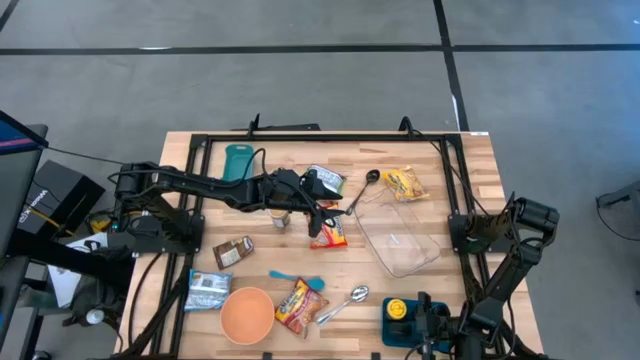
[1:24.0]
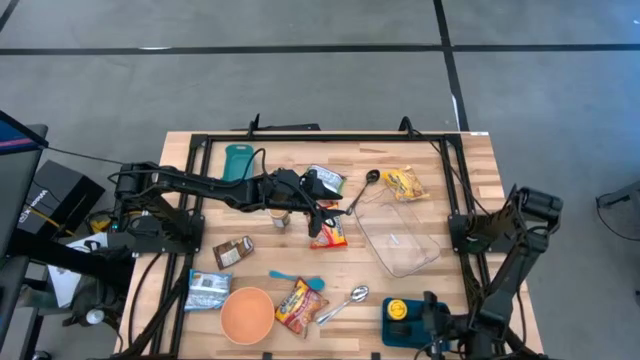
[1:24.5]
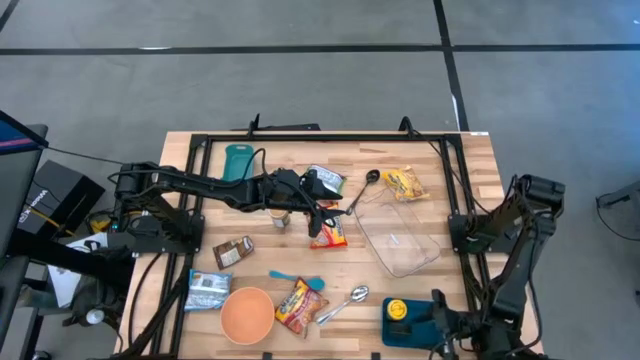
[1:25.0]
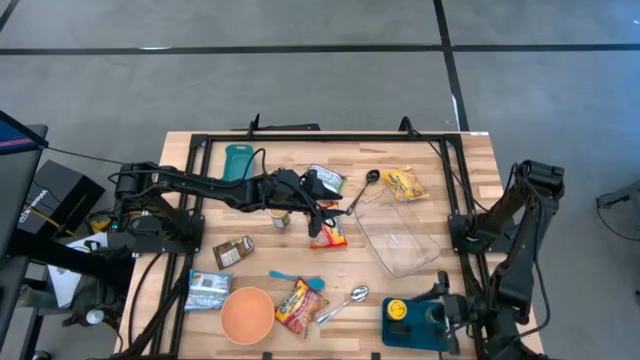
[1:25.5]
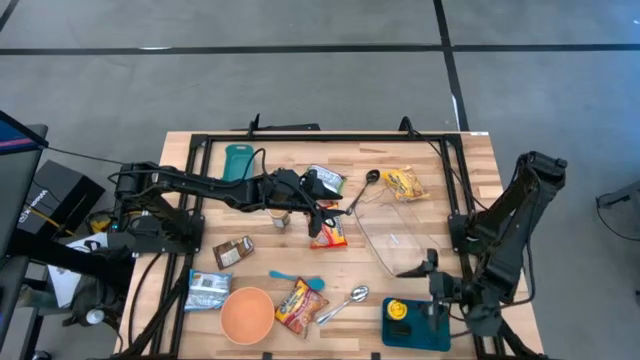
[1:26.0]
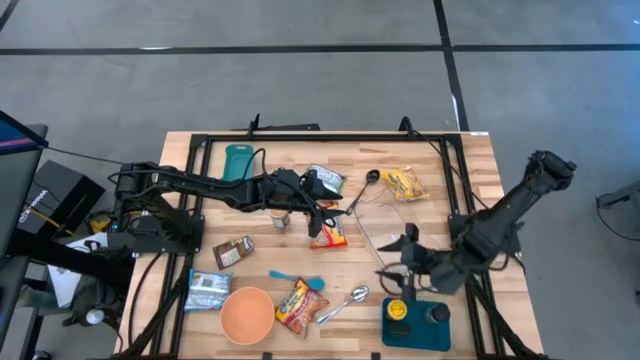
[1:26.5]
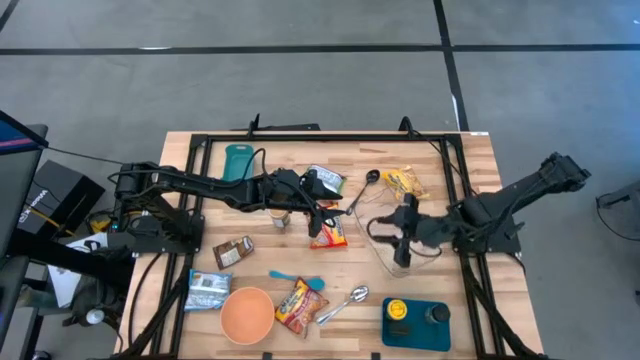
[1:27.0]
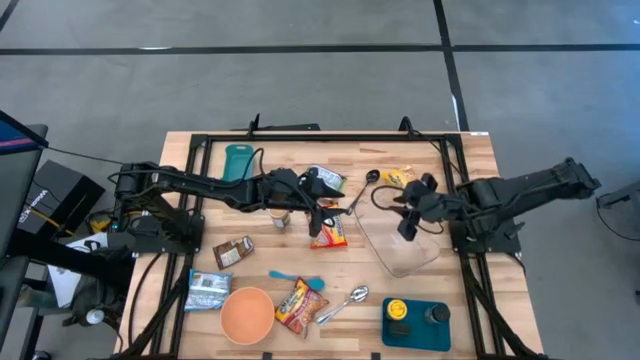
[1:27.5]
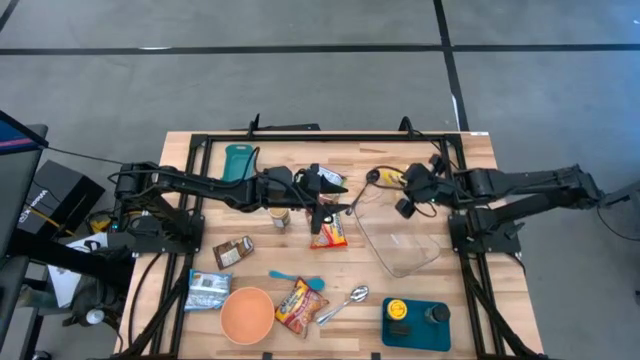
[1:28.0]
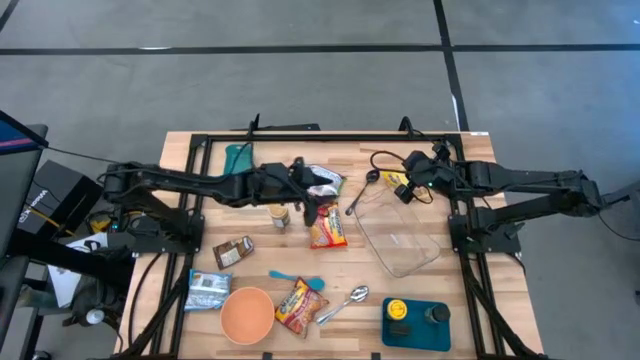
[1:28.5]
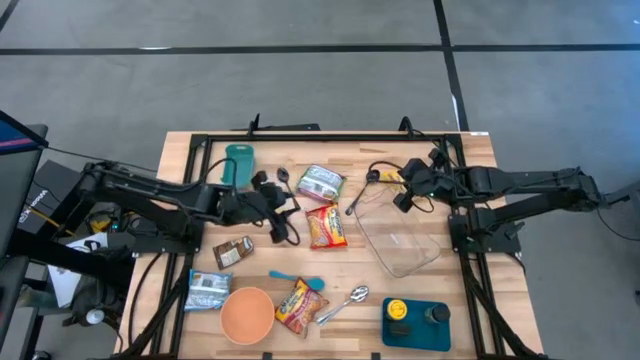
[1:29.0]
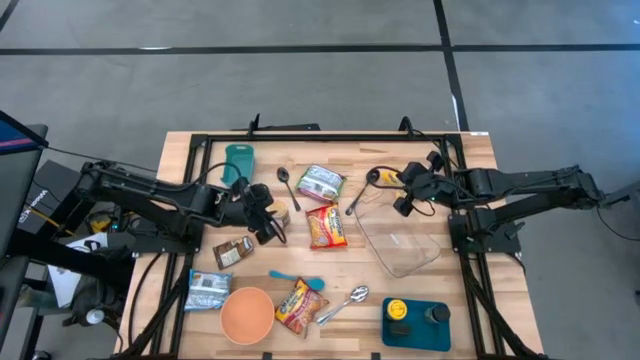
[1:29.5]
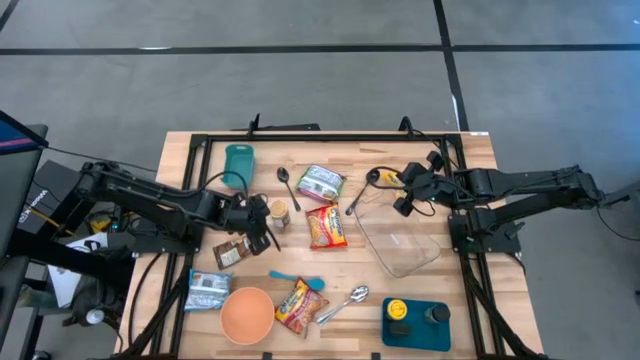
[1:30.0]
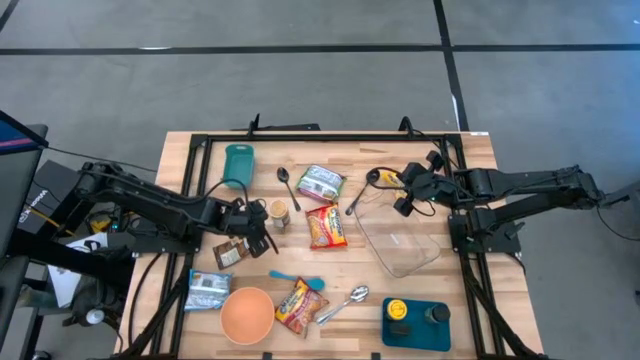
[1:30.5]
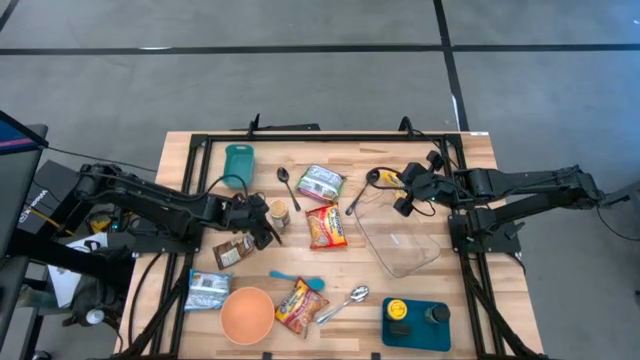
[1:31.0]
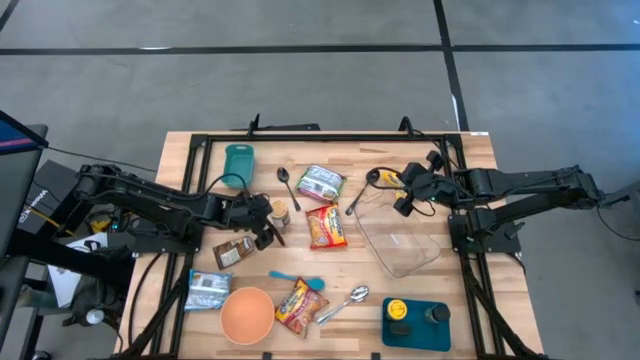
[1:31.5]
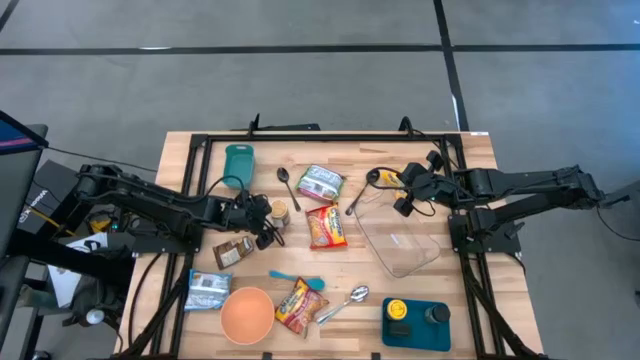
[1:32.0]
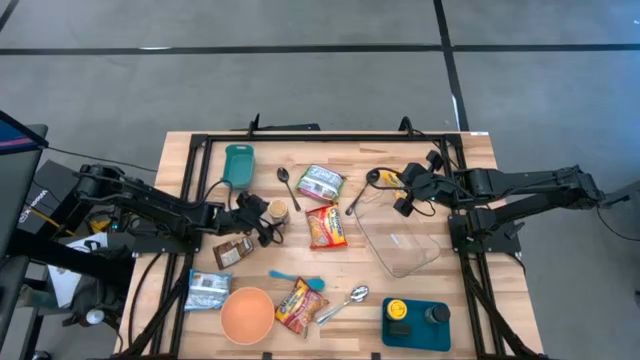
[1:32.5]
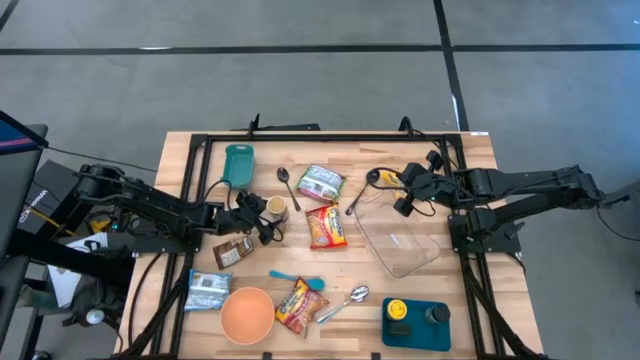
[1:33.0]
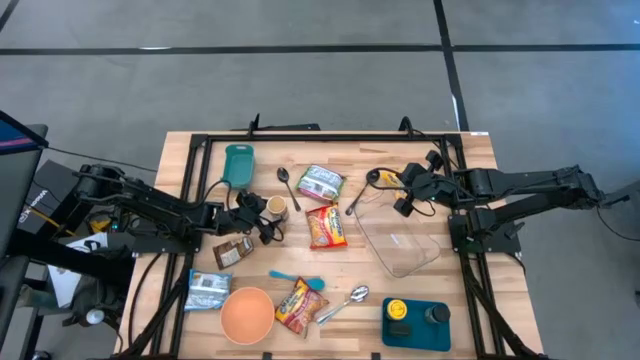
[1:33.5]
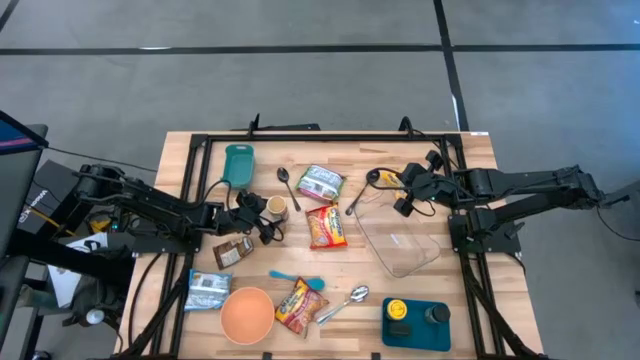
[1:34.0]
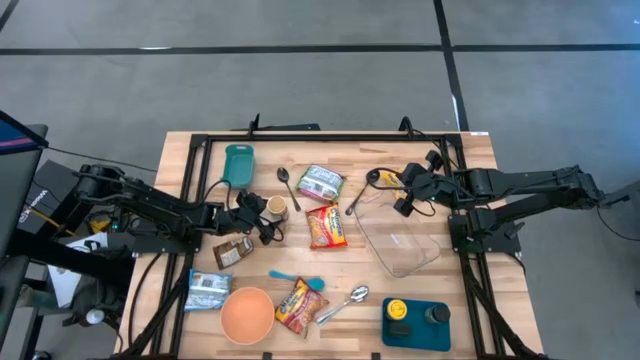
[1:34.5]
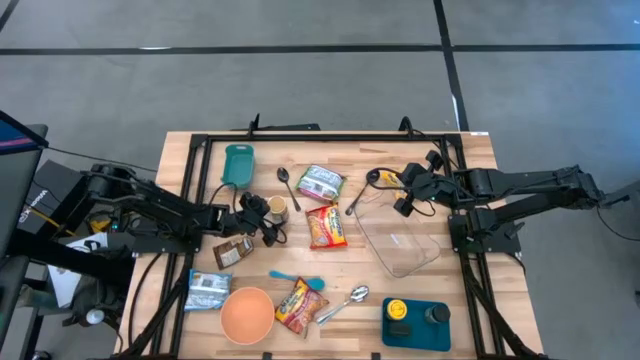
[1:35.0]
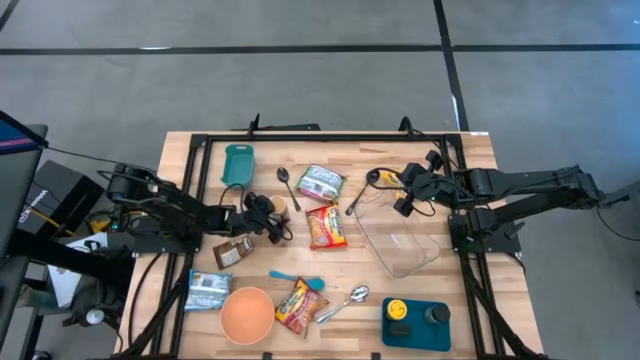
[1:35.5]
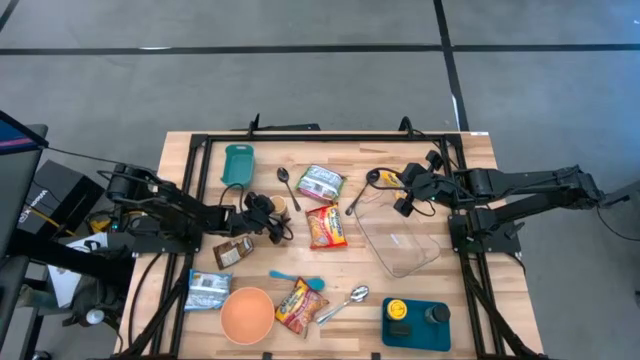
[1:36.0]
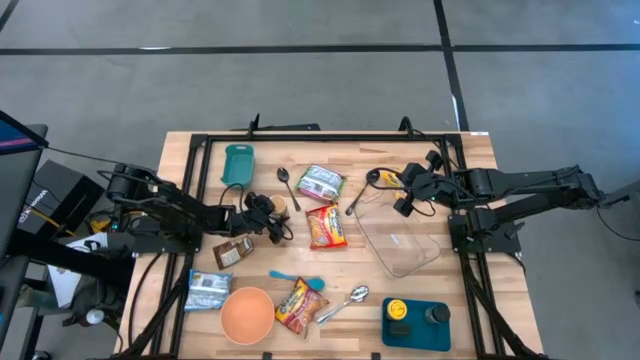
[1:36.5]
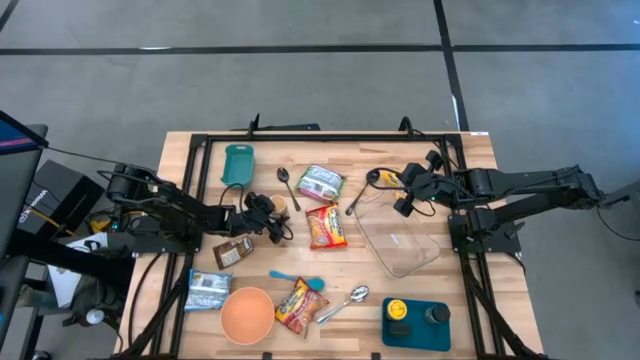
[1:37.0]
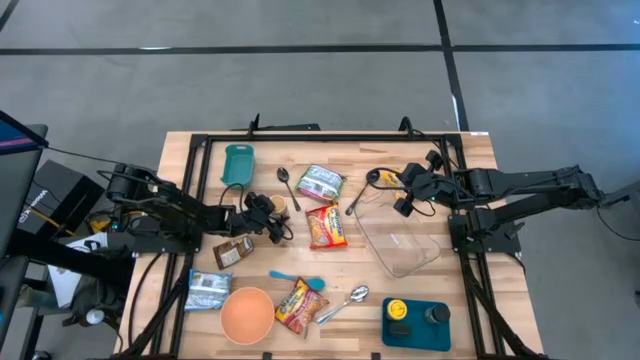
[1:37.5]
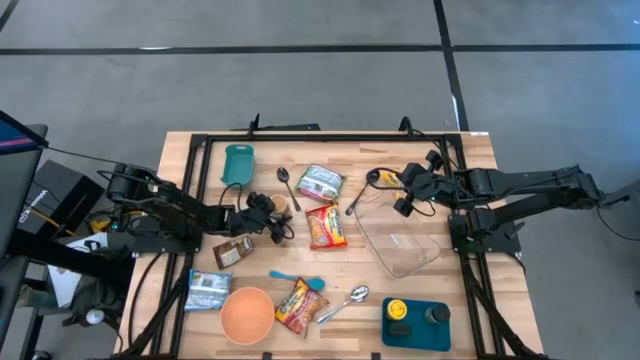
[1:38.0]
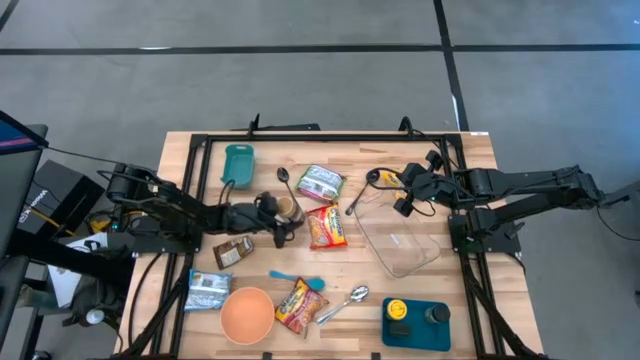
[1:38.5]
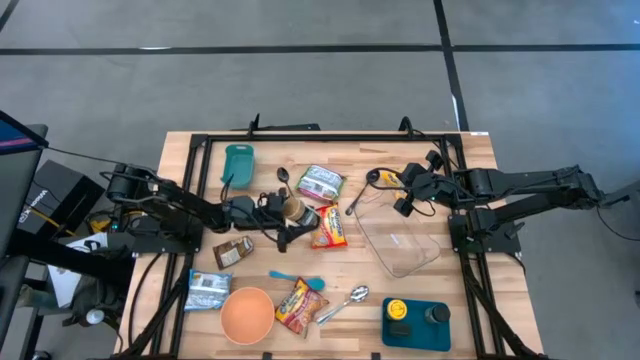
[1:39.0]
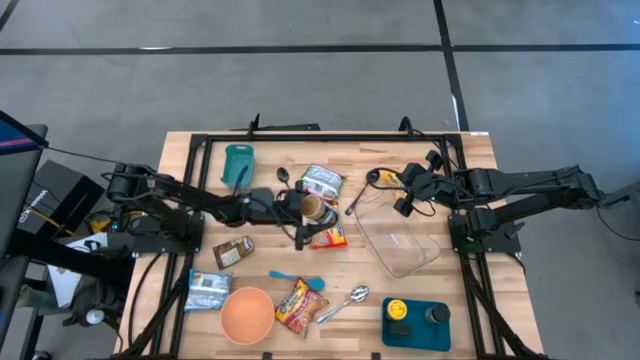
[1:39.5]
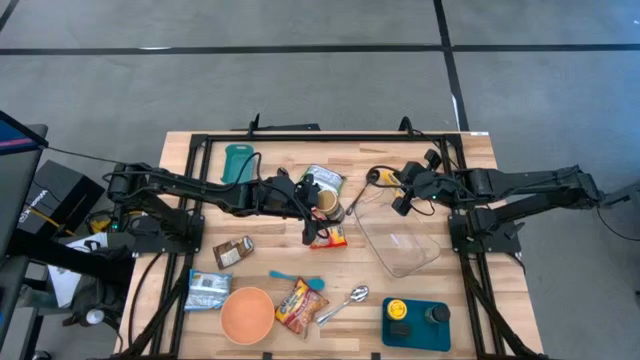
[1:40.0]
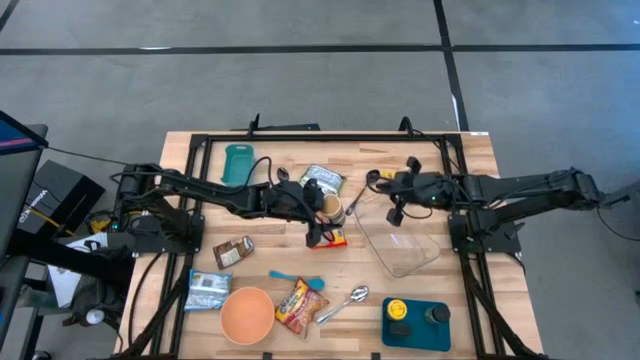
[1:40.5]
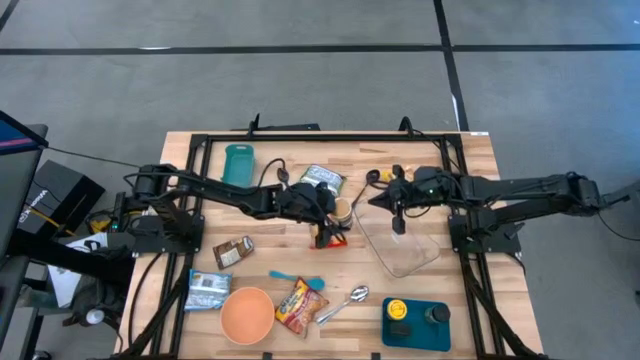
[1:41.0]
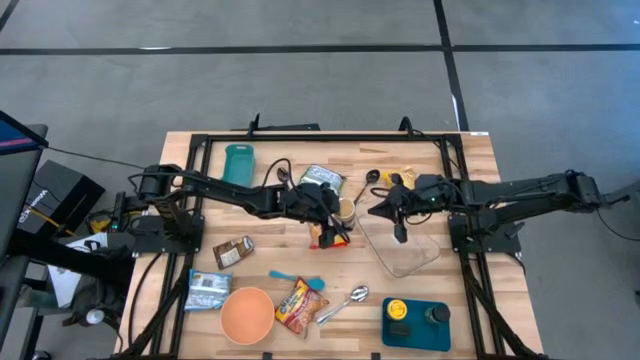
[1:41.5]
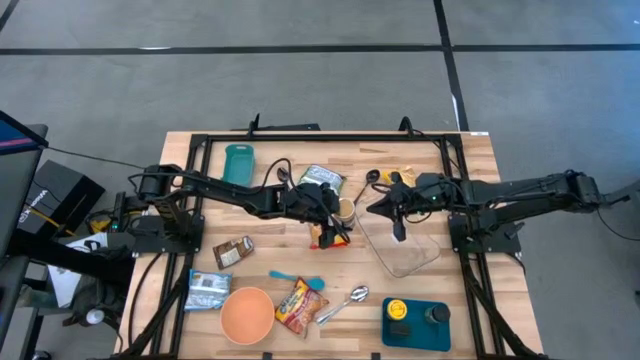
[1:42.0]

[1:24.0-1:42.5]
Task: Pick & Place Food Item
Put the golden spice bottle into the blue bin

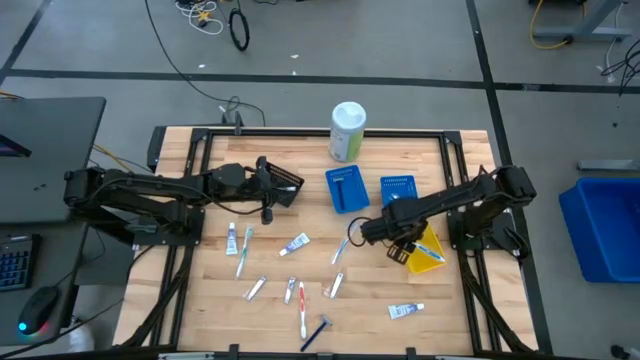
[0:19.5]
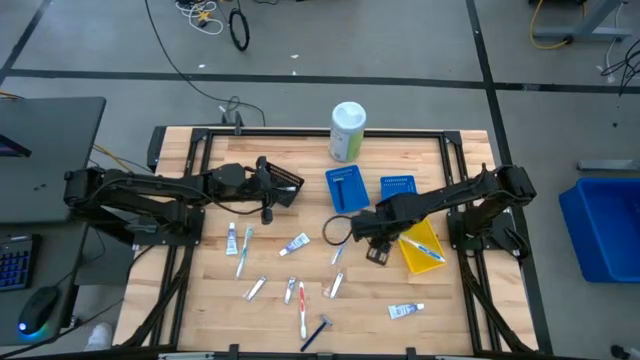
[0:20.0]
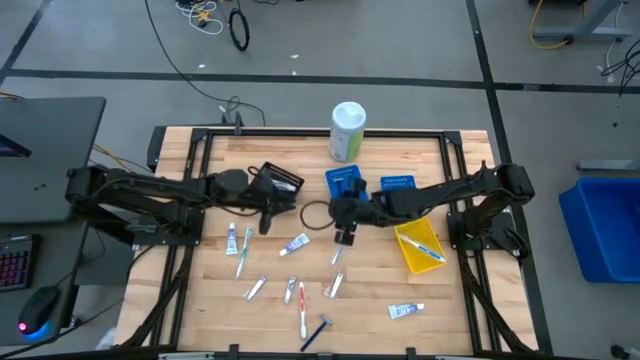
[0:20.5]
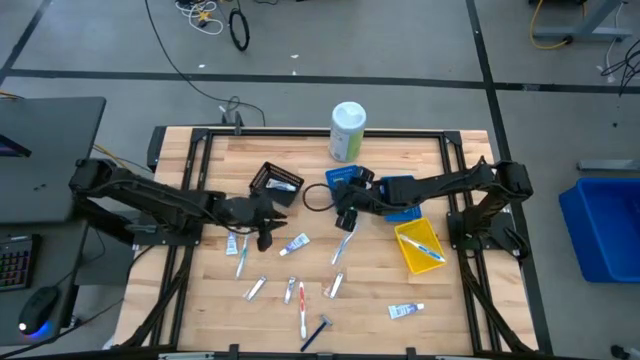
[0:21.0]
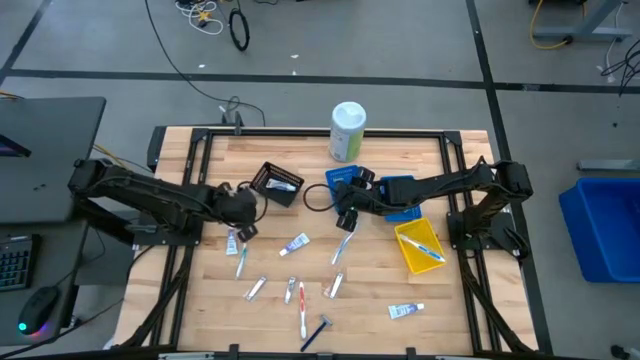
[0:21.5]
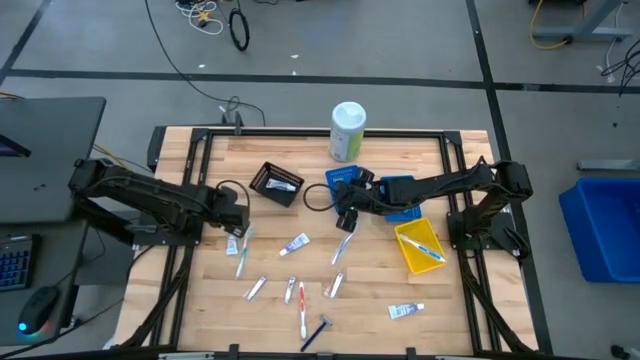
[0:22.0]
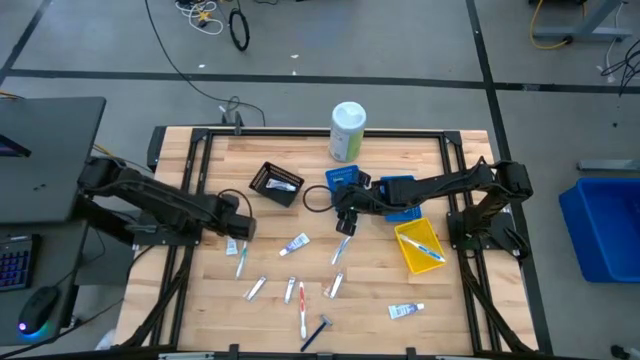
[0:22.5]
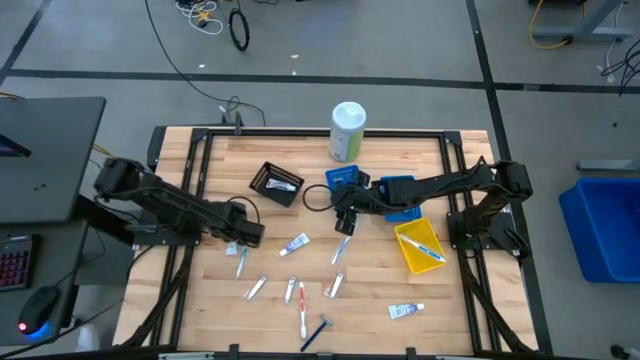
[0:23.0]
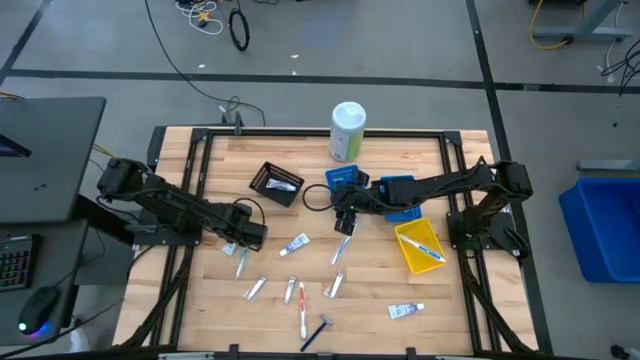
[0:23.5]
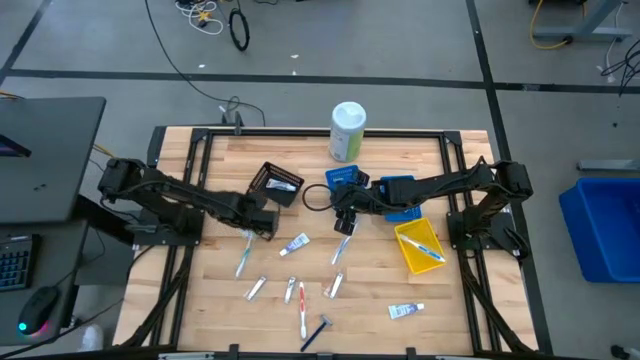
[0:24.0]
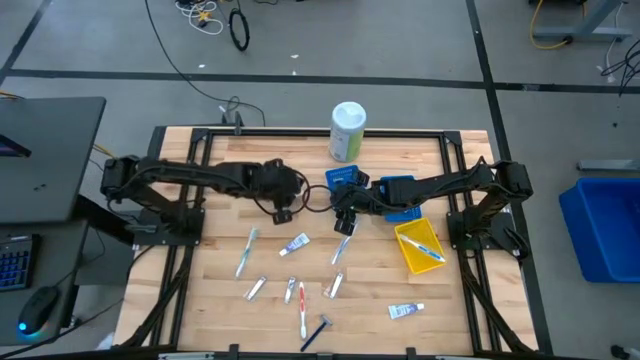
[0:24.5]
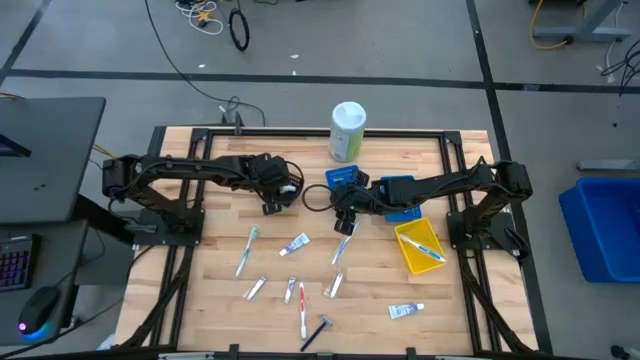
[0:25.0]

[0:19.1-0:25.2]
Task: Pick & Place Travel size toiletries
Put the toothpaste into the black basket
